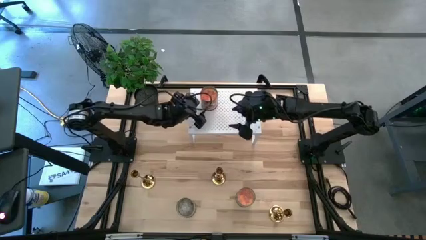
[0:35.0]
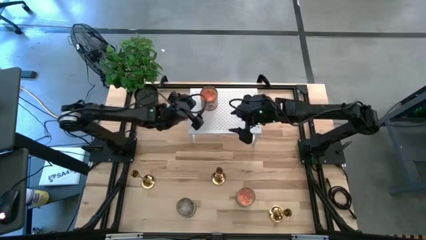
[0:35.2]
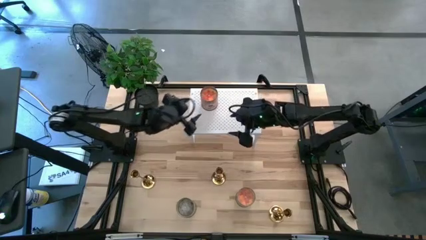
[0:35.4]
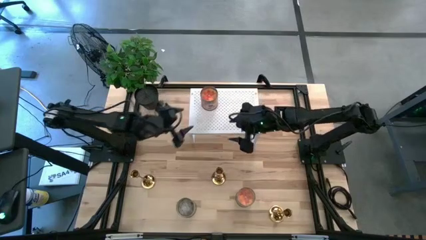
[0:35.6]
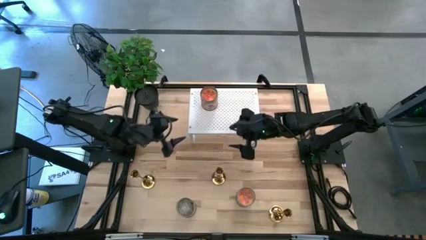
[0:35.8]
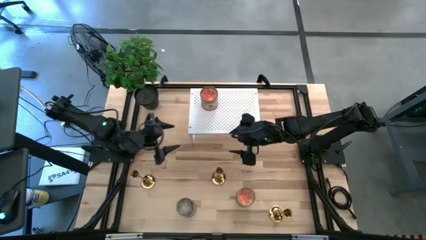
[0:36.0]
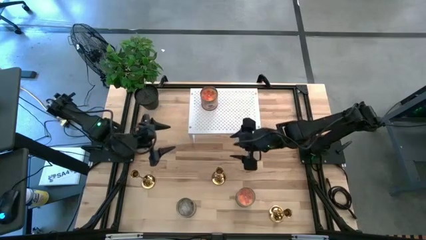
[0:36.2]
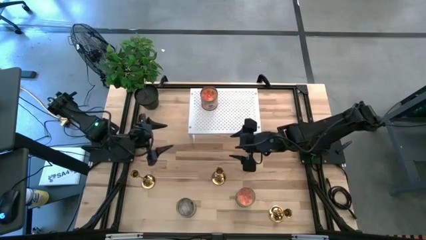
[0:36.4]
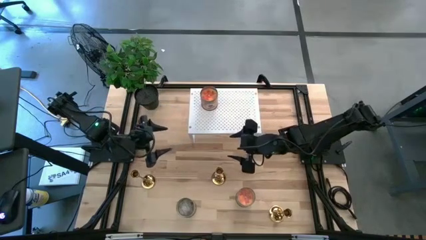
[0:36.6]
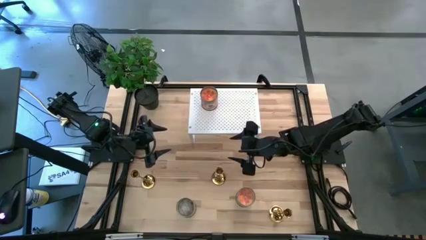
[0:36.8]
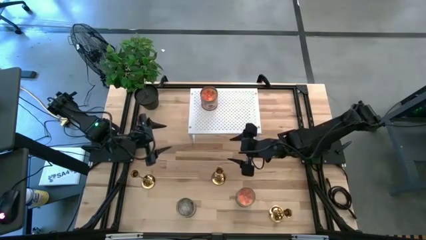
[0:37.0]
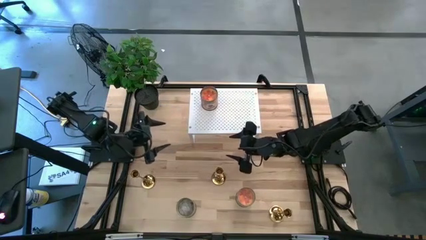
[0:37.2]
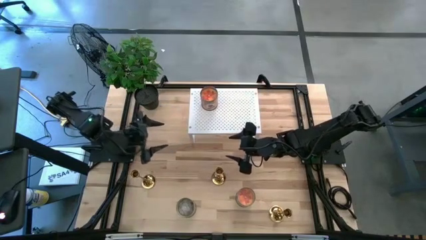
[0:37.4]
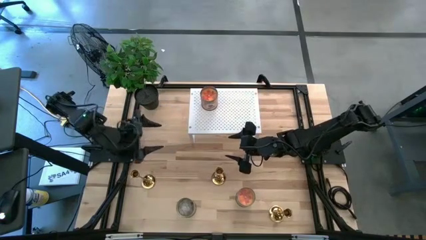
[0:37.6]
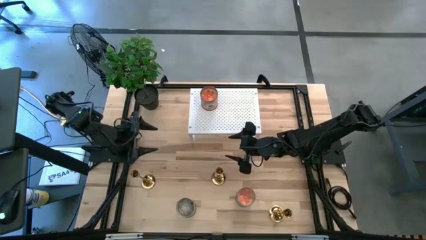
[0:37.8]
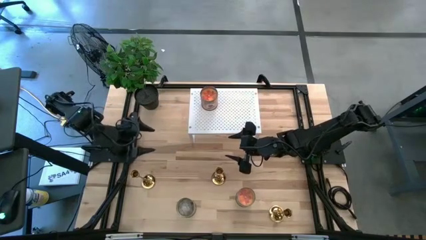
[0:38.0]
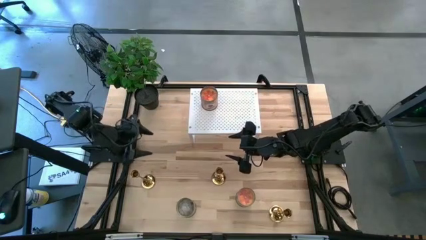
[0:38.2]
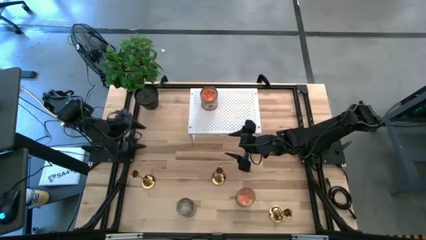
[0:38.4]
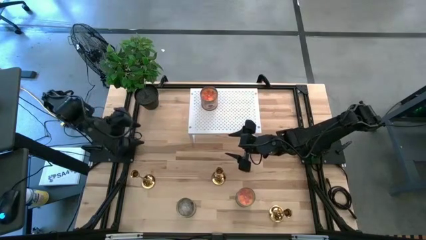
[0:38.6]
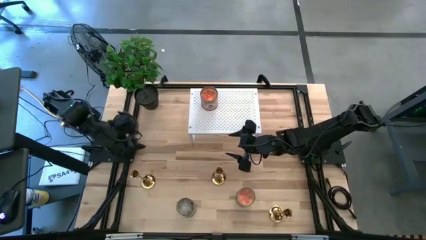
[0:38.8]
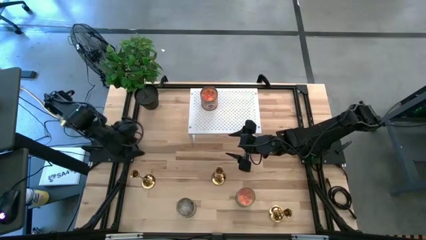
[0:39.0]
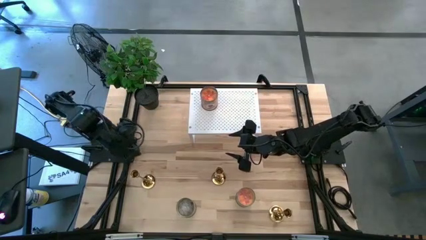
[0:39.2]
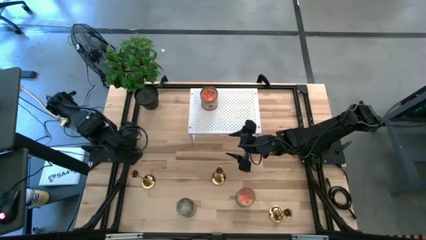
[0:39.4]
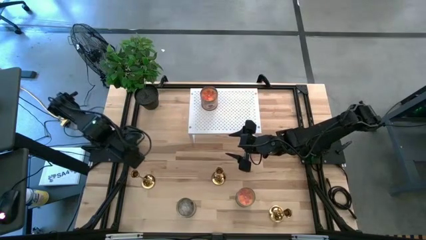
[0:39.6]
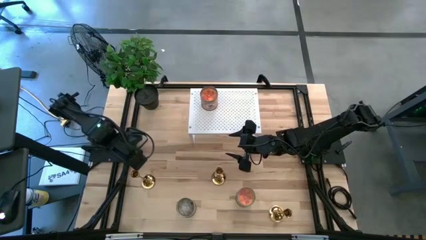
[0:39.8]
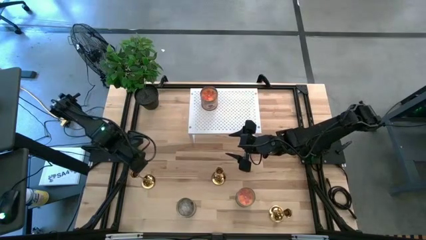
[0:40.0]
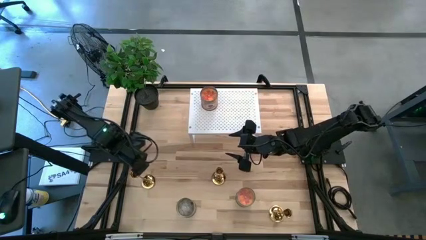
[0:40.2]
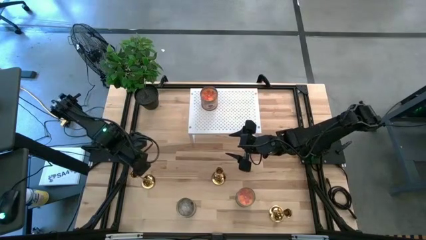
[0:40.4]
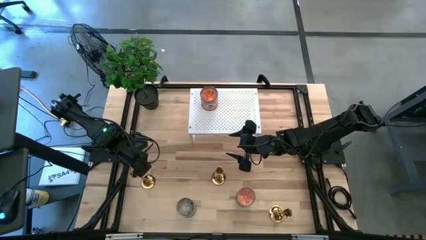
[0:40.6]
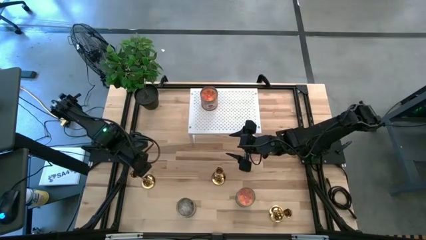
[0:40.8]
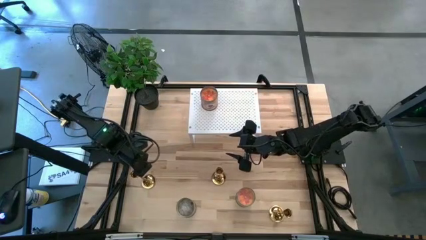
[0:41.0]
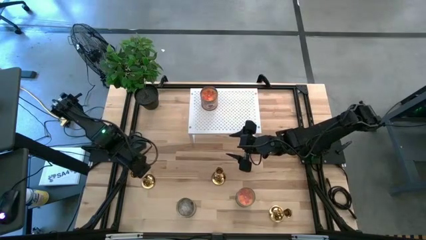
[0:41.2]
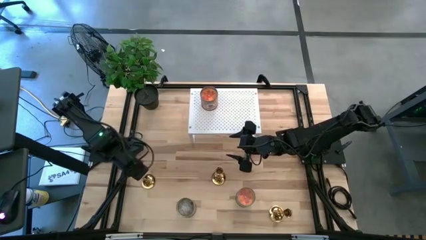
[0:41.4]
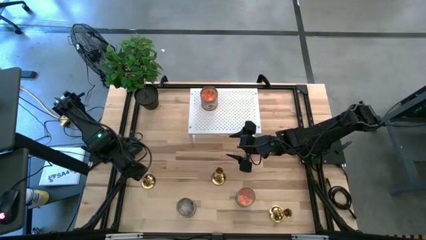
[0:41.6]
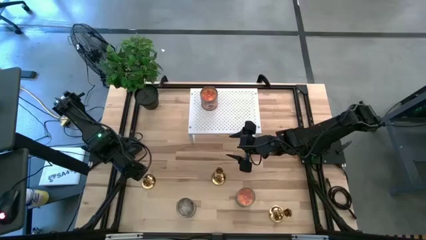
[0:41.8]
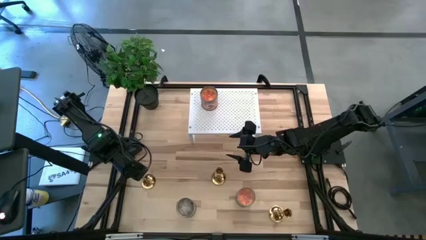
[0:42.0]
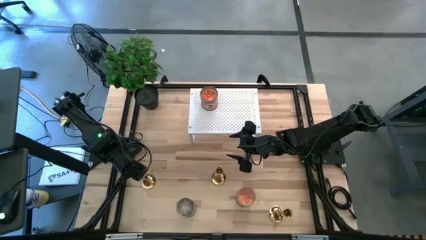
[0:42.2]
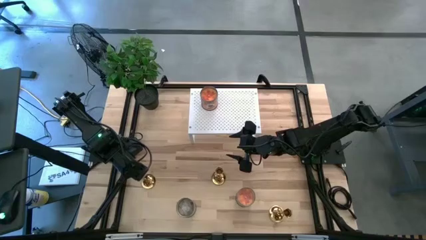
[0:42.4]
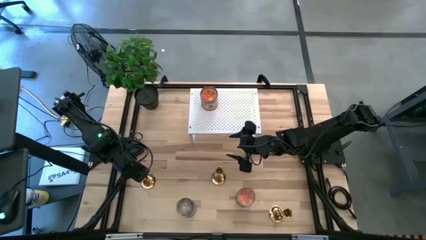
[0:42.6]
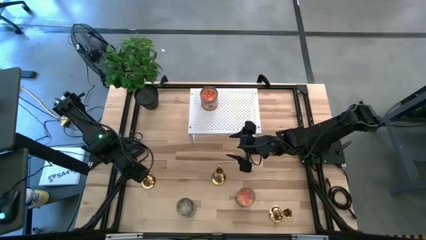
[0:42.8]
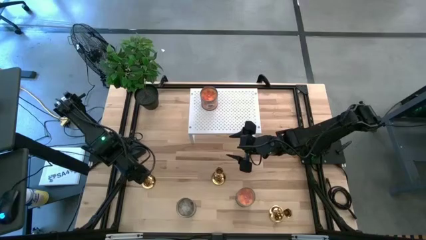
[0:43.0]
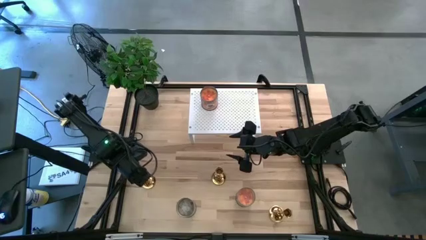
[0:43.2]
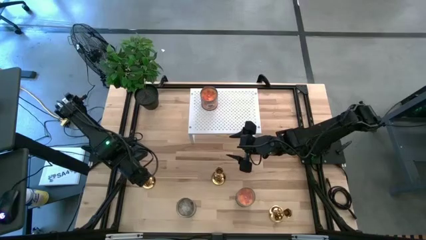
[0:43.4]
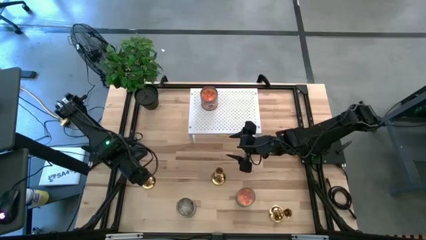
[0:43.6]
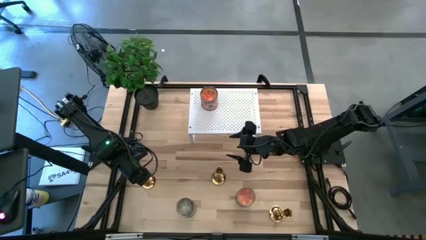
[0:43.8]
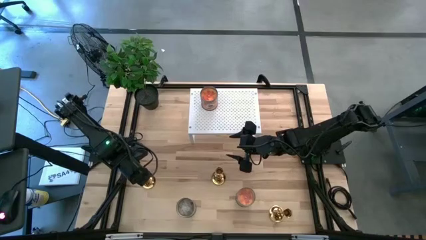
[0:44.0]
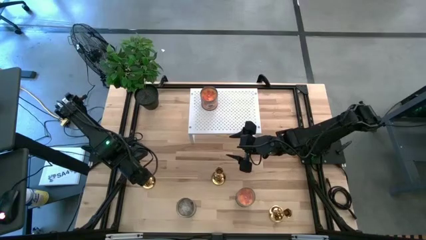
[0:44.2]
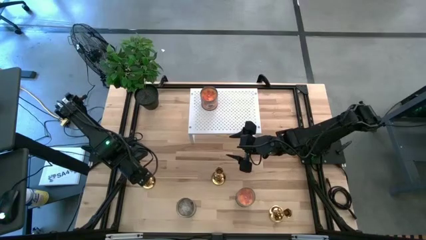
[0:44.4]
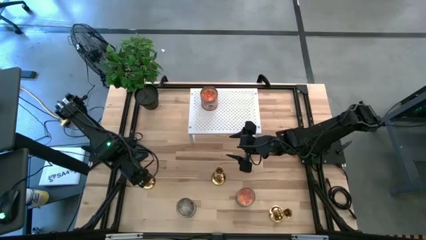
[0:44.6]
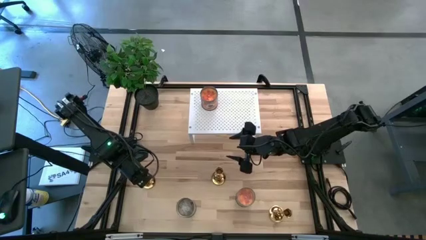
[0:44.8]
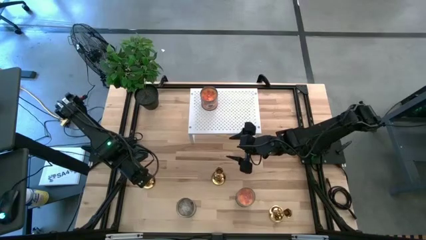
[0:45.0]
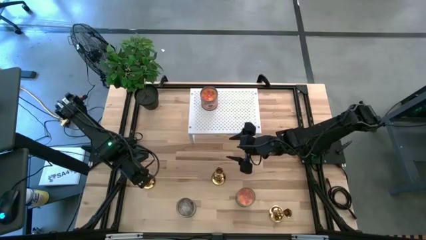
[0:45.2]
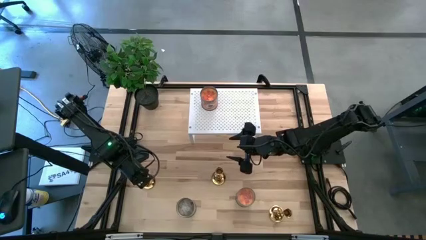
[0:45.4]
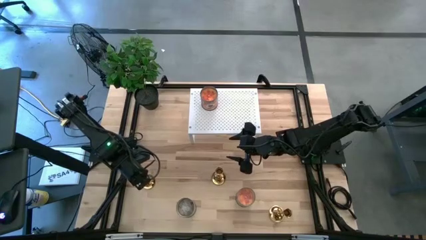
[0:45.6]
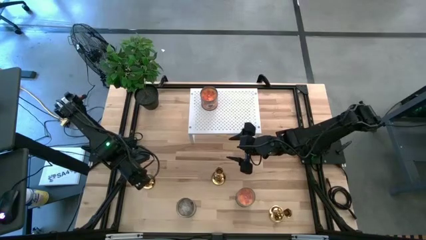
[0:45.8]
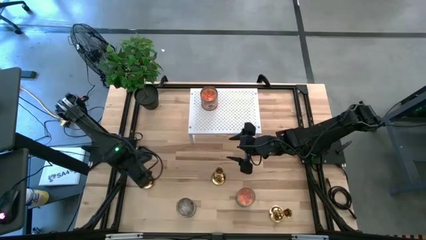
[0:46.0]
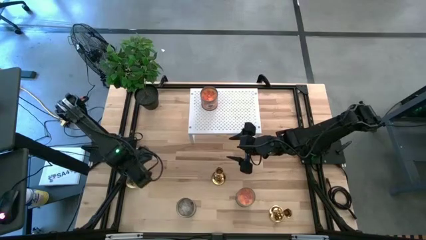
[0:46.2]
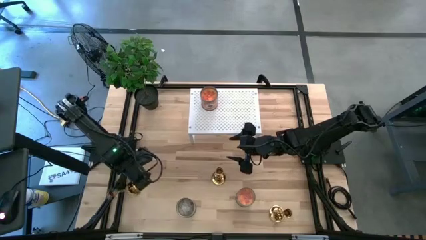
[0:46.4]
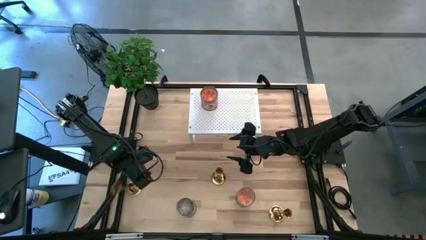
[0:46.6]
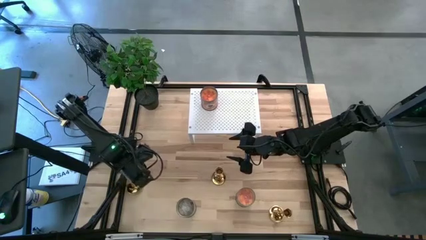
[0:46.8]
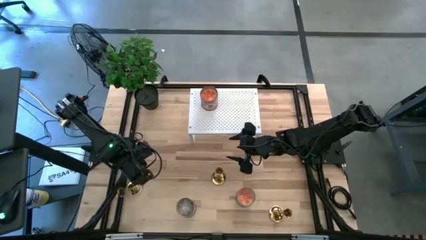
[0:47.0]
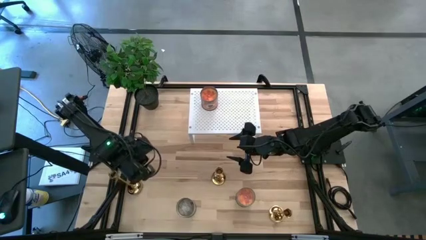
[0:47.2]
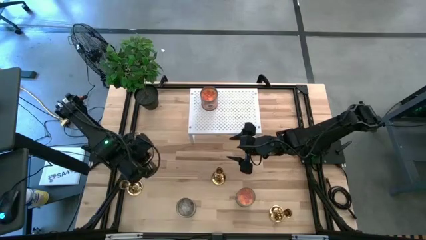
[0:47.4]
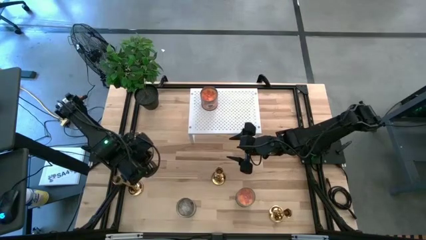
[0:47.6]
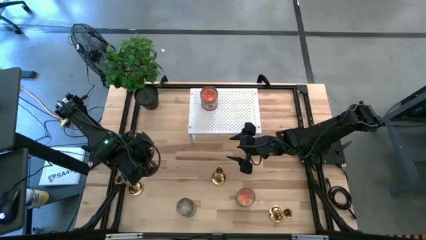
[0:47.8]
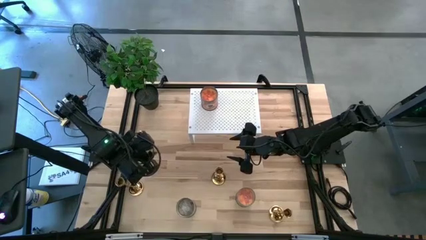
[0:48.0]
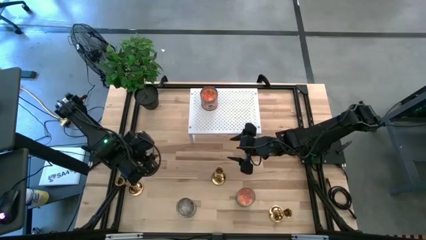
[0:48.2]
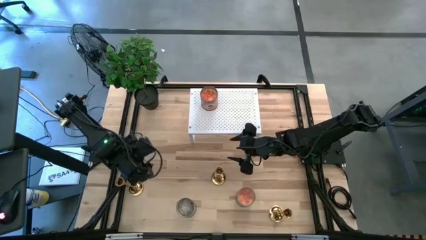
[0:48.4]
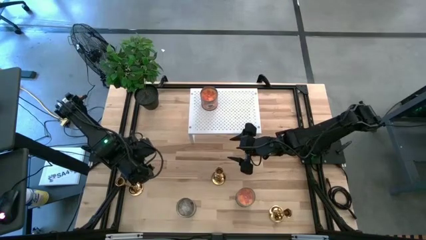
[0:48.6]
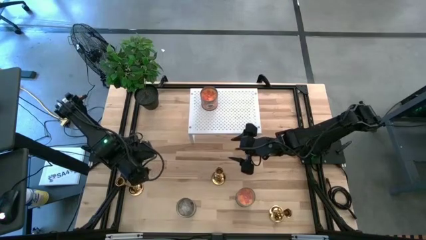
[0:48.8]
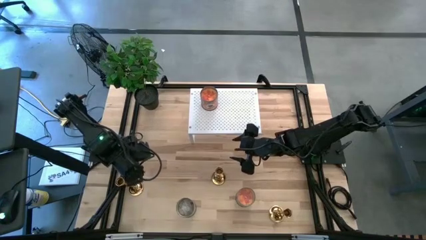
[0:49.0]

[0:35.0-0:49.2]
Task: Pick & Place candle stick holders
Put the left gold candle holder on the shelf
